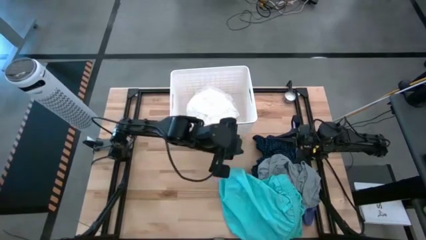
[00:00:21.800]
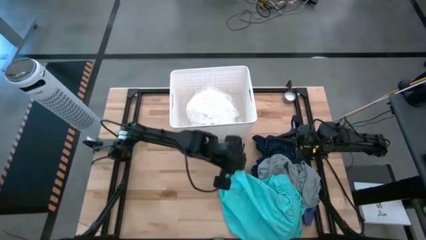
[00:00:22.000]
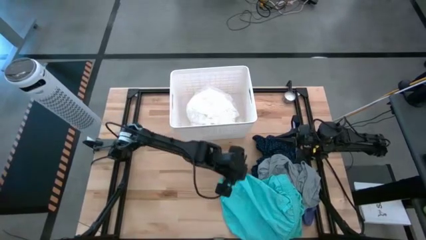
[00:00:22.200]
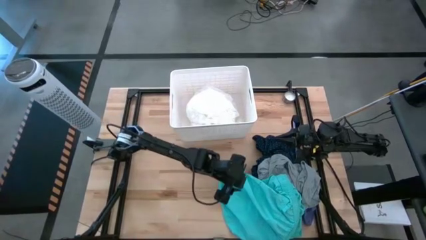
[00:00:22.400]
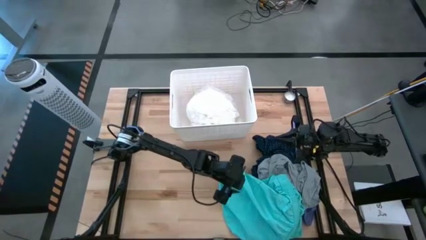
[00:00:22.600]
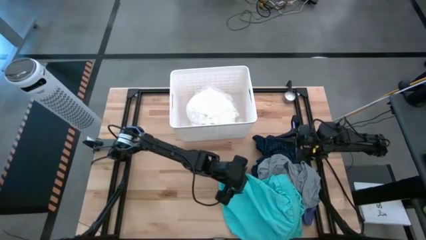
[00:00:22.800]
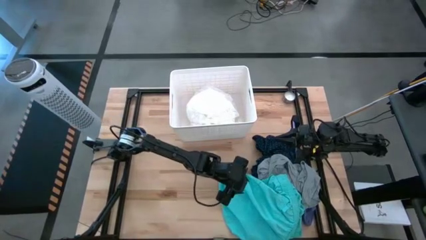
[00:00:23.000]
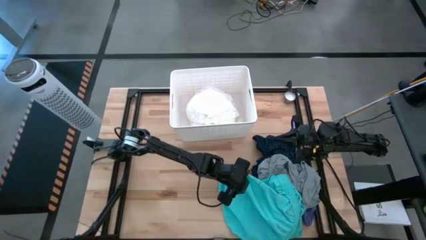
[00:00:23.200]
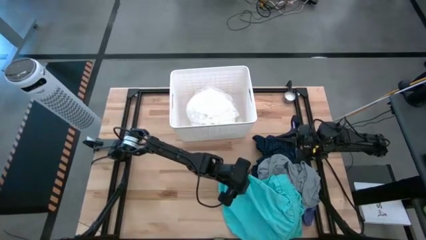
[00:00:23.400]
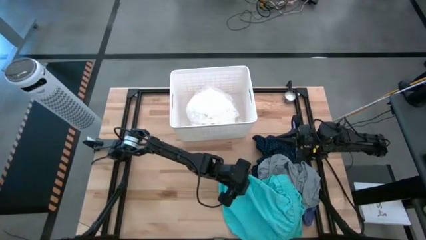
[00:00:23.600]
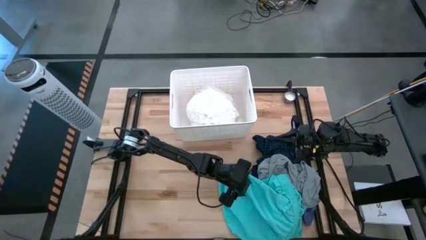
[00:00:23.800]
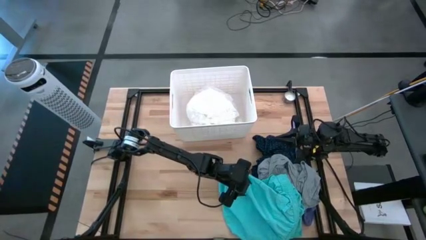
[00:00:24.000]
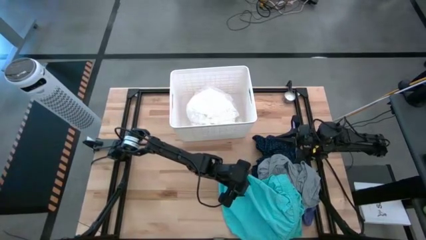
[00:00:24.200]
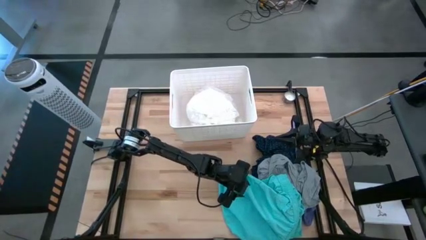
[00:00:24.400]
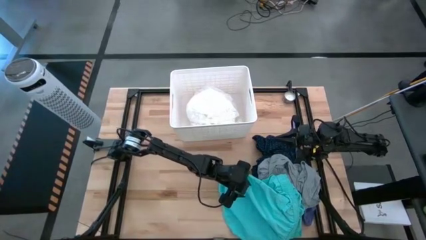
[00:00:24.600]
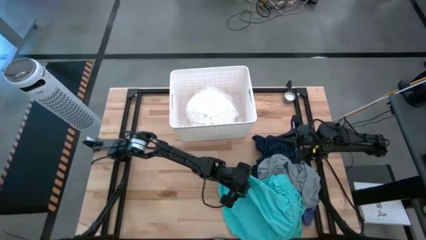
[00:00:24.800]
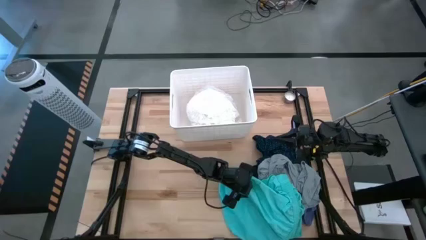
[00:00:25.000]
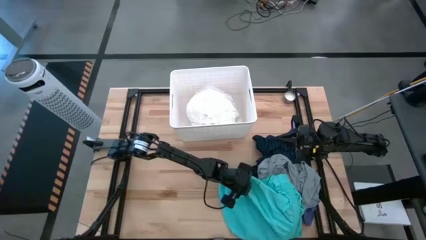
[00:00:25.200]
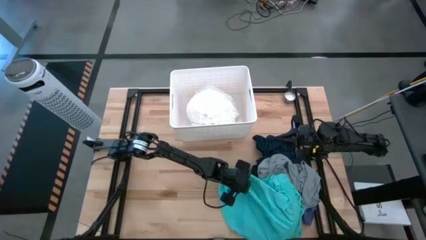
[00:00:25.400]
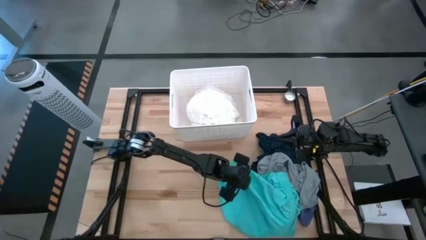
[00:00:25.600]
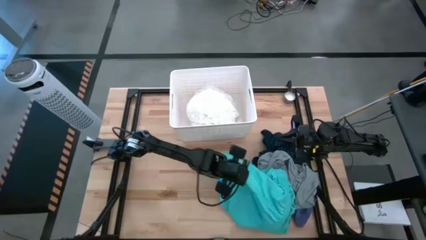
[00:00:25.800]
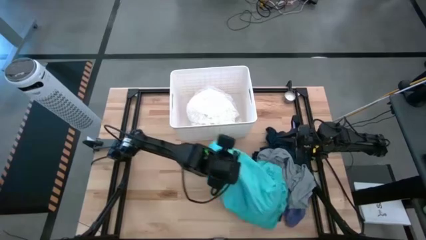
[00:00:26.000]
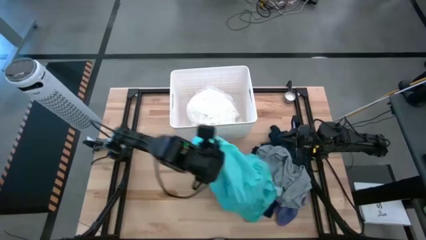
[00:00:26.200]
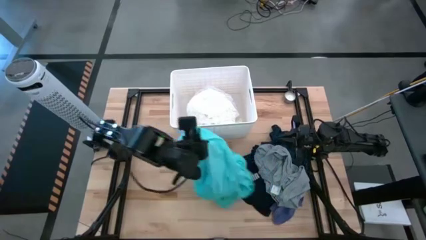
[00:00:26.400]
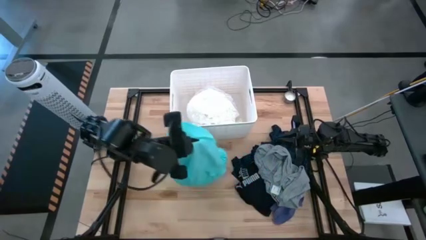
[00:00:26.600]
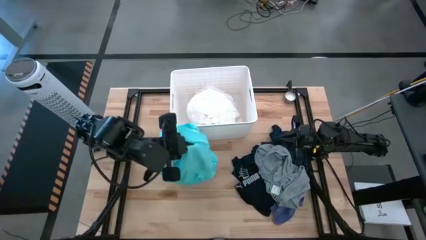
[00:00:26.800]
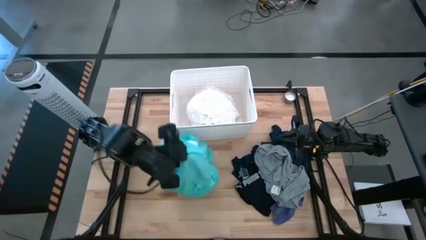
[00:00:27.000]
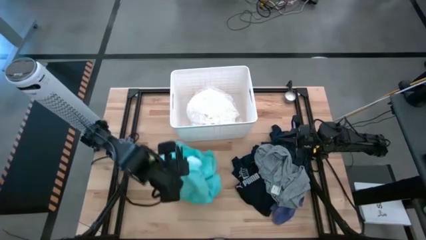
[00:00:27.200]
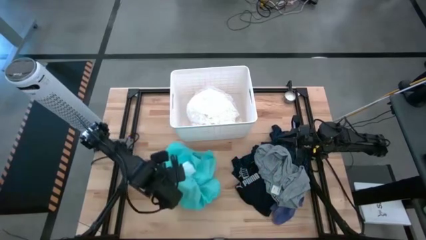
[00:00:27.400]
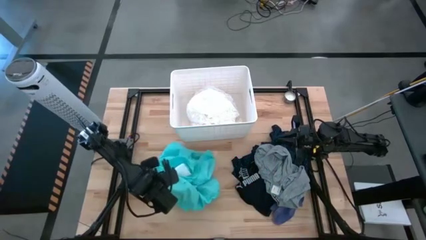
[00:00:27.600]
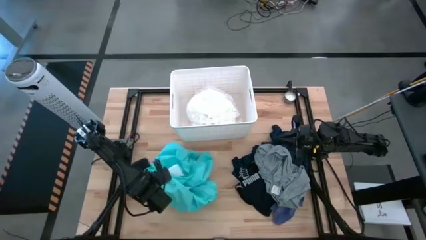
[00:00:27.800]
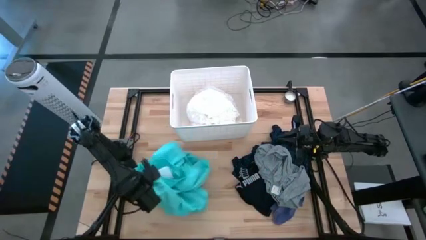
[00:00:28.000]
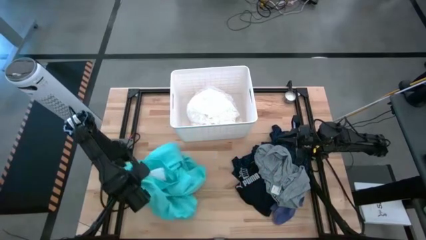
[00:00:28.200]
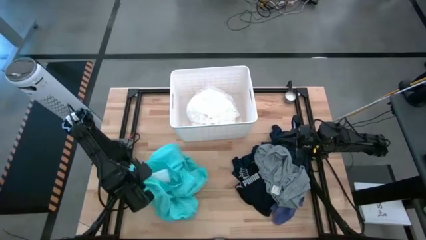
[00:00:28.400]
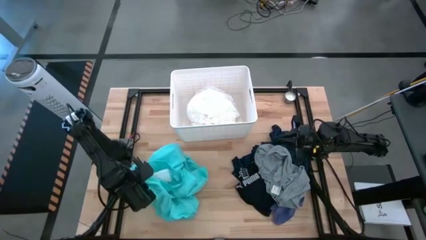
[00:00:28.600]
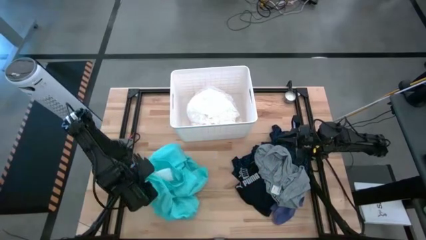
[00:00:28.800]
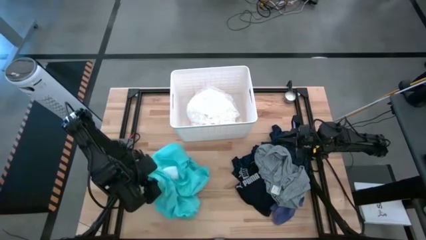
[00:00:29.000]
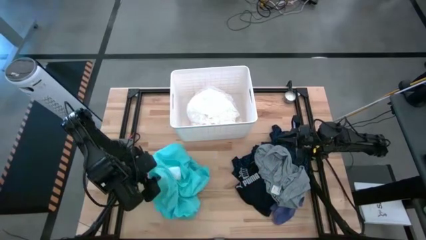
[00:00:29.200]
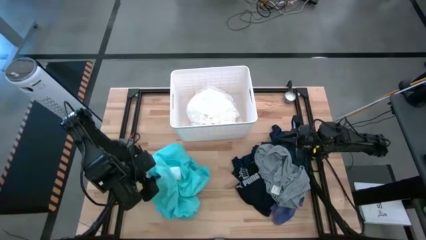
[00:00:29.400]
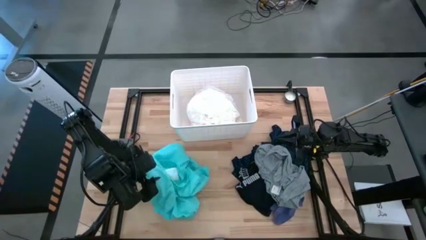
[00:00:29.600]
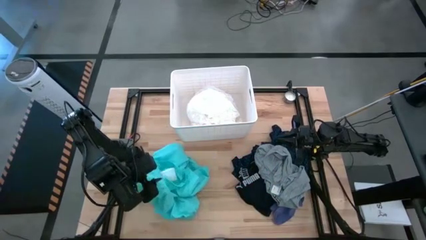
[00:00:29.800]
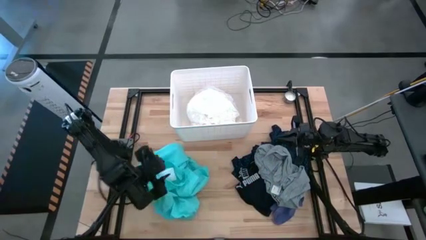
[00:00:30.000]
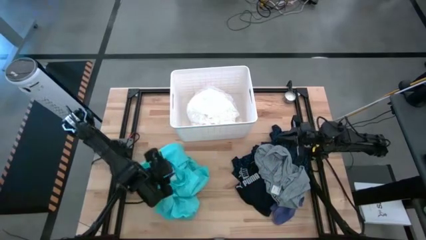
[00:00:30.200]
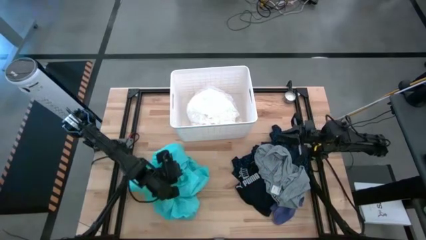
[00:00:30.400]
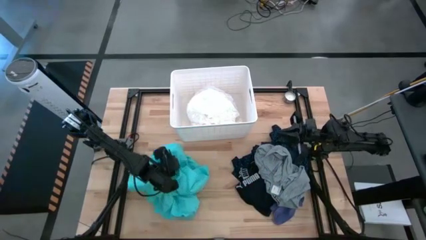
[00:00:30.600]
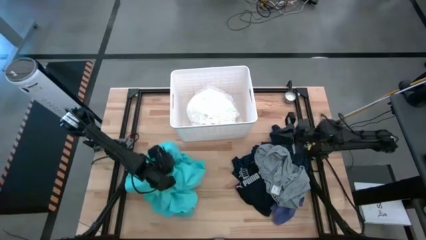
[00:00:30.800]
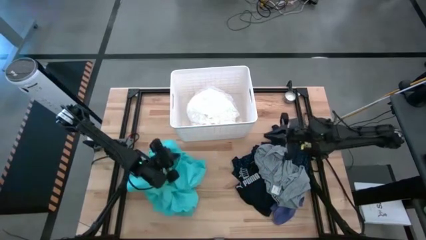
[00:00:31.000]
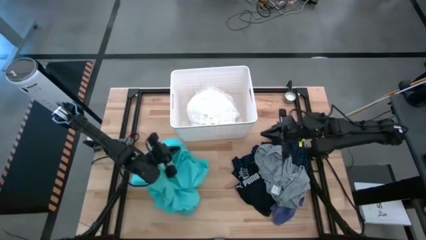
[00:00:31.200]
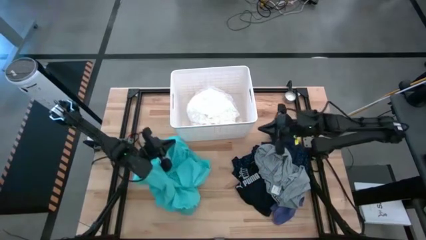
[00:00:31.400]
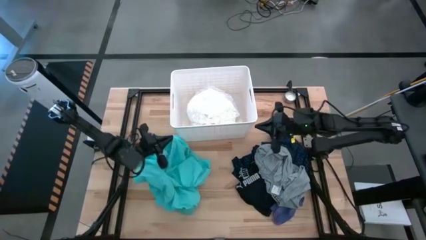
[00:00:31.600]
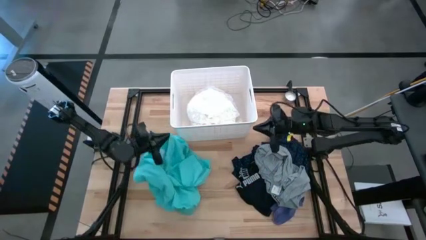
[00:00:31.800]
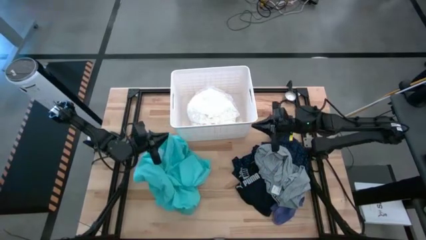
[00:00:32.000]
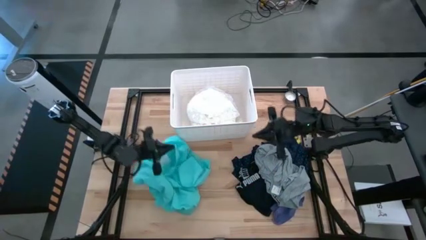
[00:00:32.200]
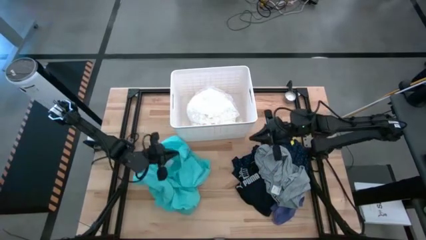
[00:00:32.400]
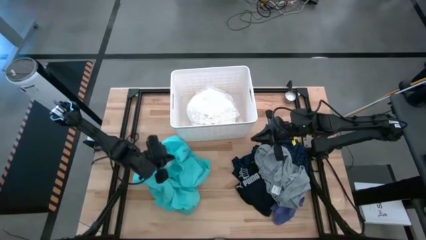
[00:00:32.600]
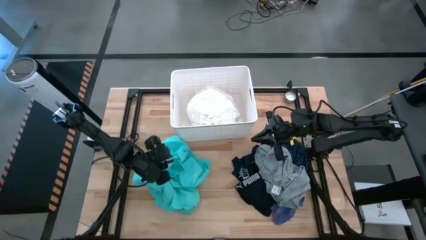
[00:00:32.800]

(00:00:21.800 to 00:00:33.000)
Task: Sort clothes
Move the light blue shorts to the middle left of the table

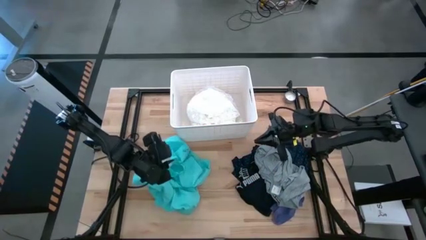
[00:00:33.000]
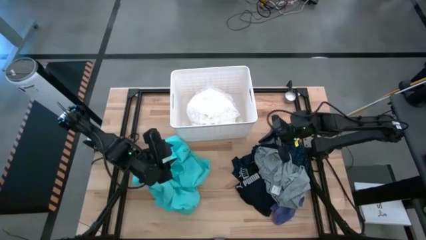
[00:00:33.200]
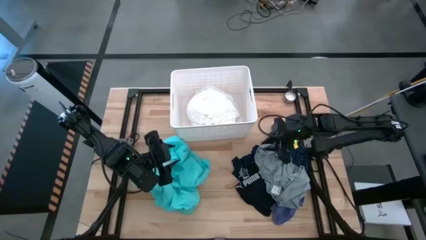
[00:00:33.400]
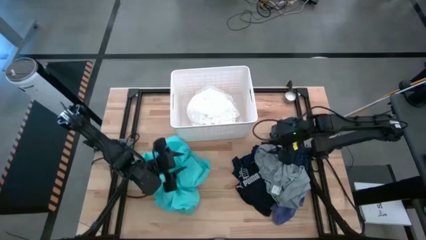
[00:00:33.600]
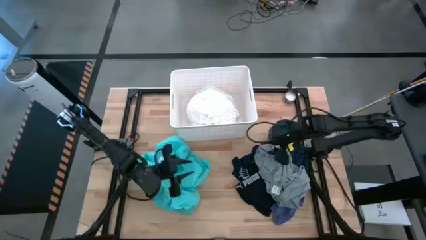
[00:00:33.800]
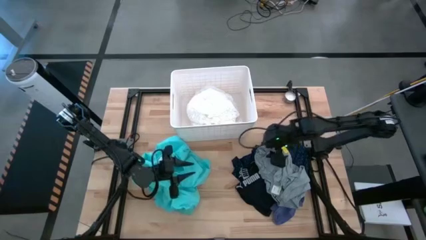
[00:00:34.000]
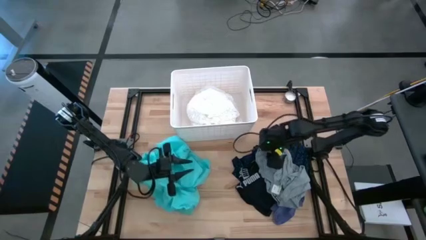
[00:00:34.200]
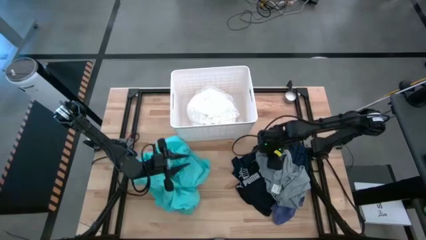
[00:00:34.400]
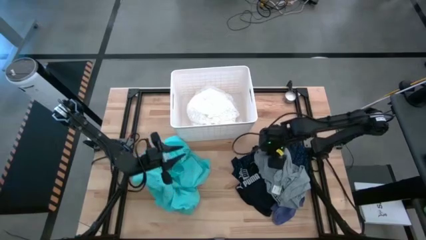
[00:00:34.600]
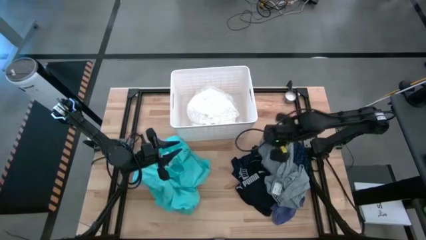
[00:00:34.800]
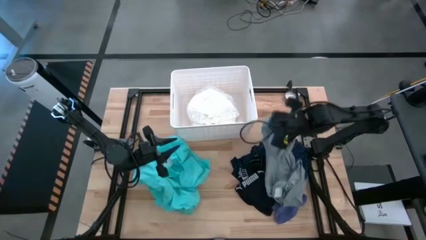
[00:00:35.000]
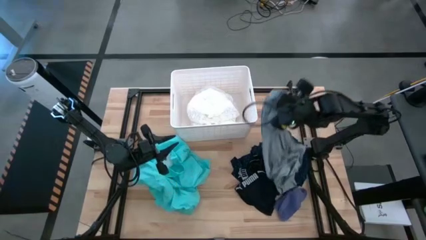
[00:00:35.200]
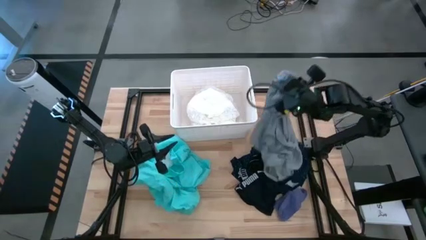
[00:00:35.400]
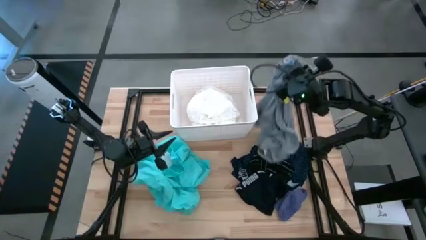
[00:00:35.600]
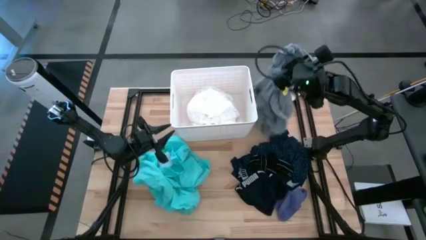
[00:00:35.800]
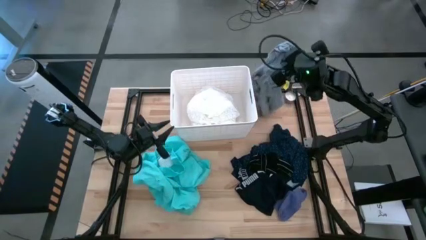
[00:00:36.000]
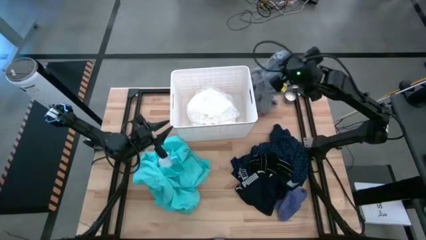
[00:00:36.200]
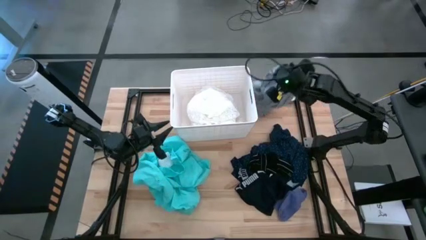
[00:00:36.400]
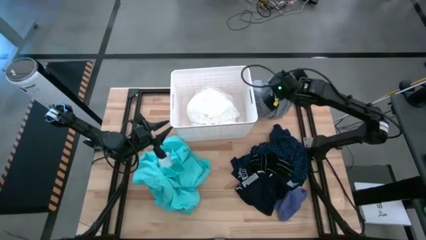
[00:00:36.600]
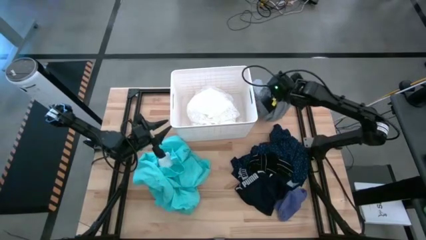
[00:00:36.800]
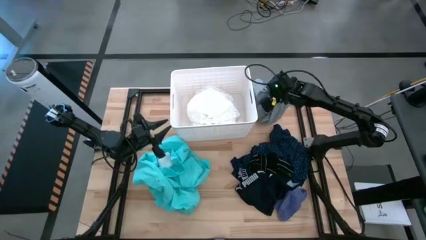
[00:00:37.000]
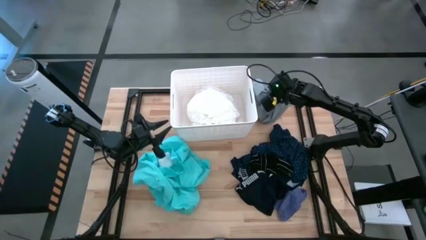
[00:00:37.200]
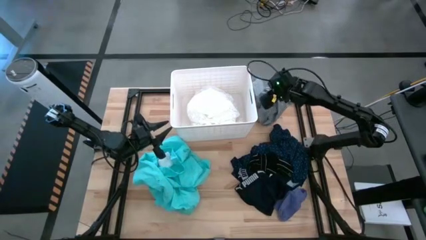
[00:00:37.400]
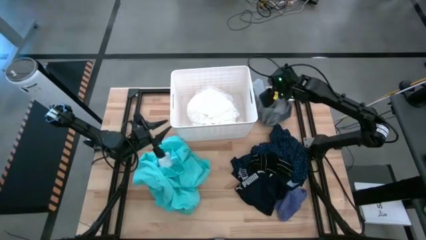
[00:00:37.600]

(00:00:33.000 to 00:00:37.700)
Move the gray shirt to the upper right of the table
